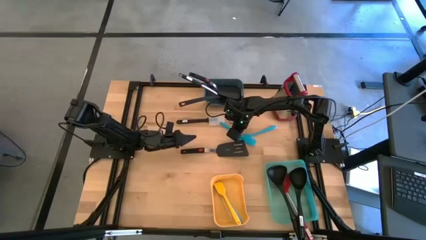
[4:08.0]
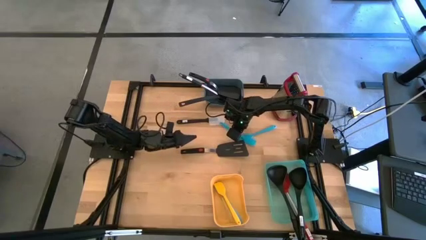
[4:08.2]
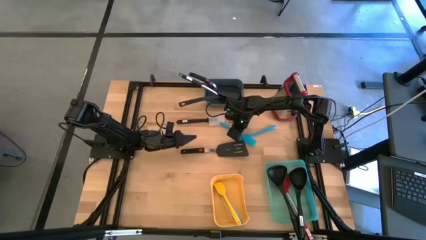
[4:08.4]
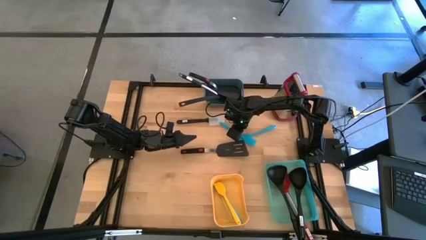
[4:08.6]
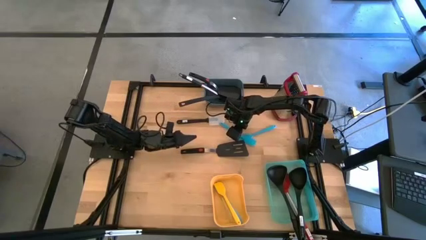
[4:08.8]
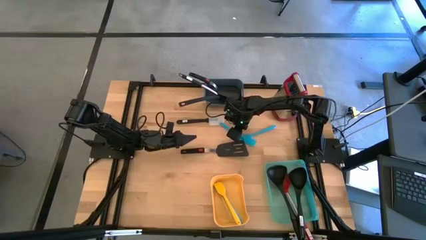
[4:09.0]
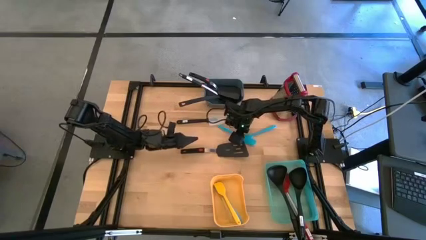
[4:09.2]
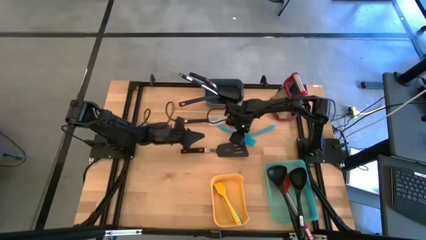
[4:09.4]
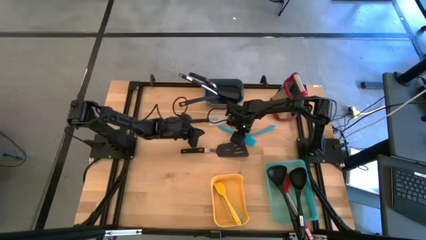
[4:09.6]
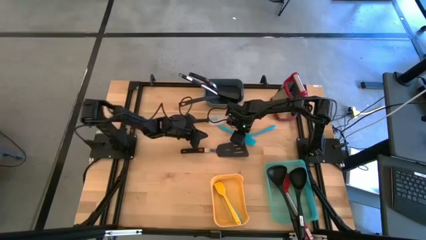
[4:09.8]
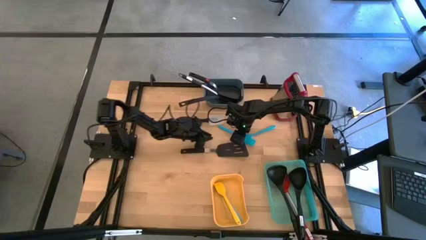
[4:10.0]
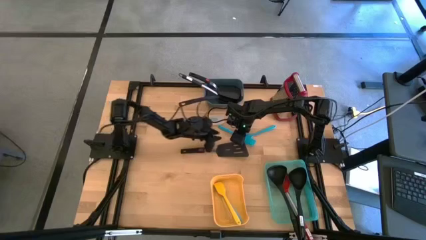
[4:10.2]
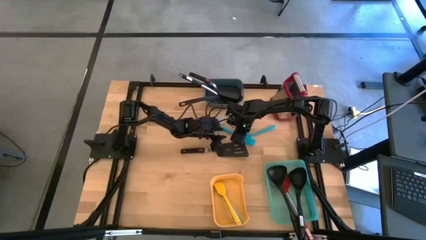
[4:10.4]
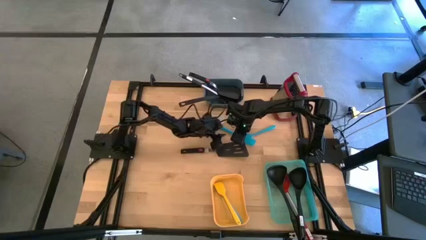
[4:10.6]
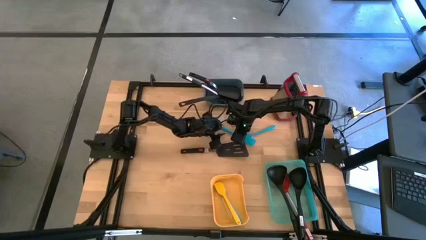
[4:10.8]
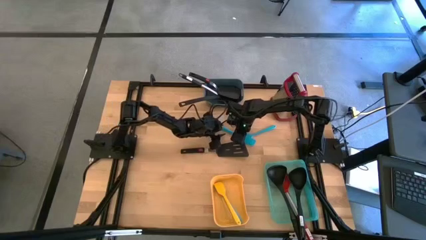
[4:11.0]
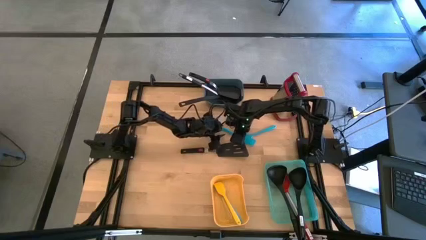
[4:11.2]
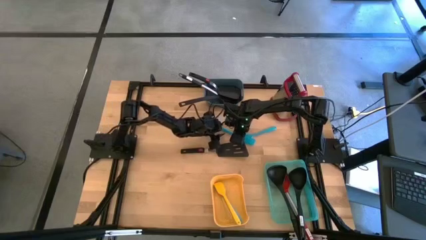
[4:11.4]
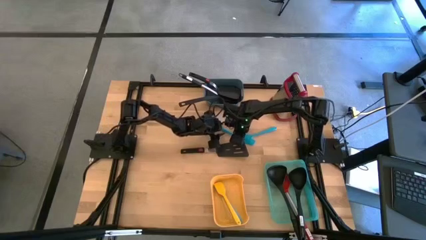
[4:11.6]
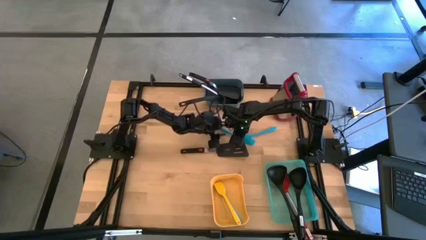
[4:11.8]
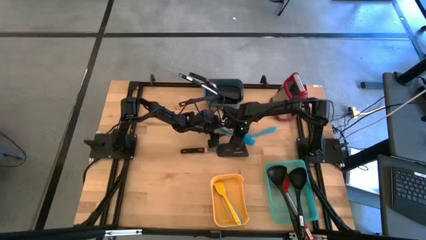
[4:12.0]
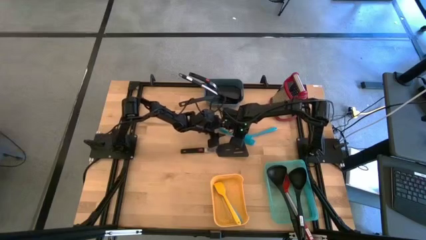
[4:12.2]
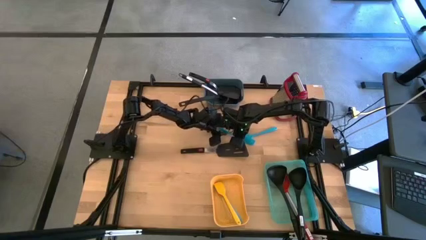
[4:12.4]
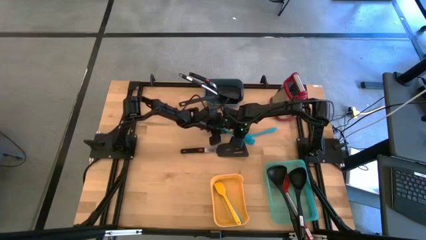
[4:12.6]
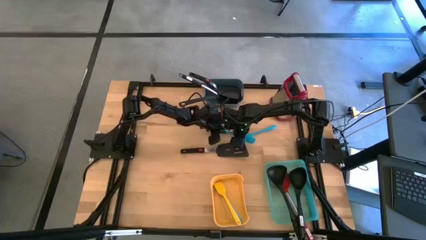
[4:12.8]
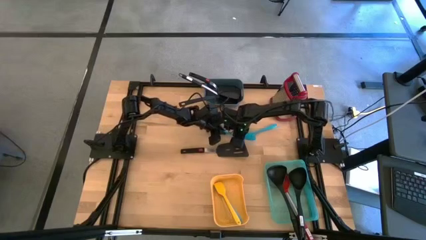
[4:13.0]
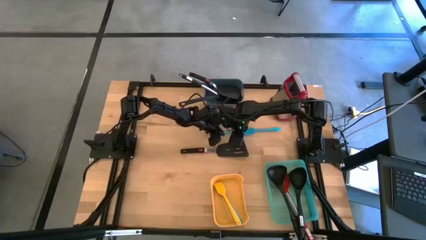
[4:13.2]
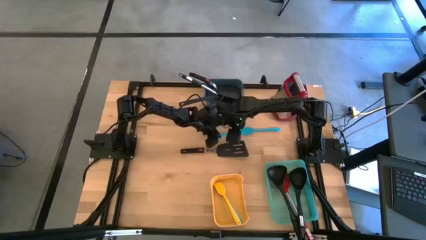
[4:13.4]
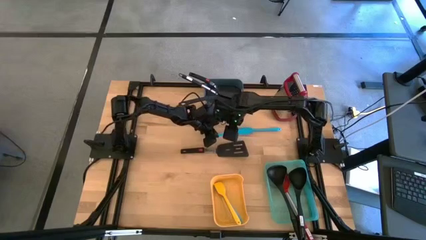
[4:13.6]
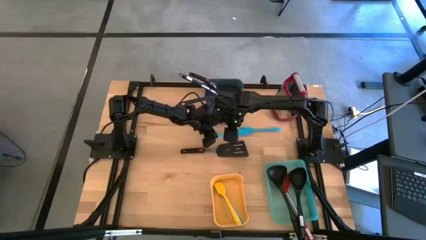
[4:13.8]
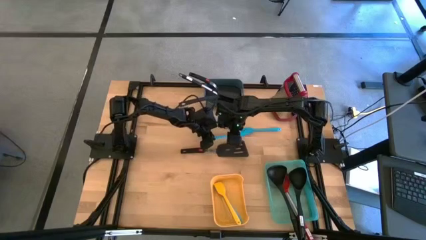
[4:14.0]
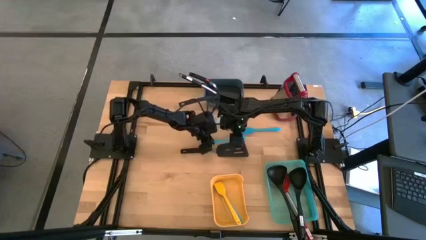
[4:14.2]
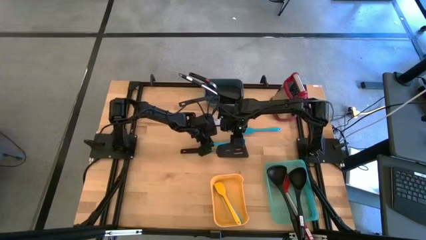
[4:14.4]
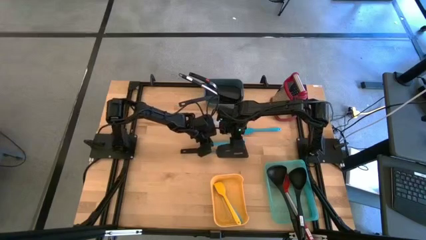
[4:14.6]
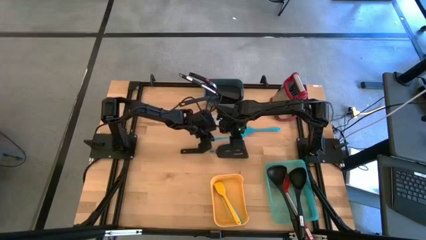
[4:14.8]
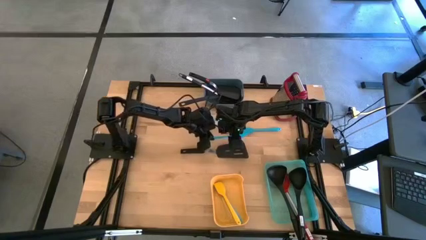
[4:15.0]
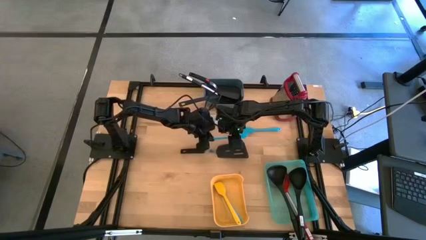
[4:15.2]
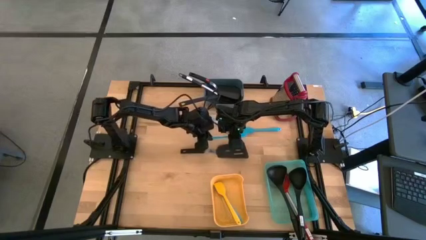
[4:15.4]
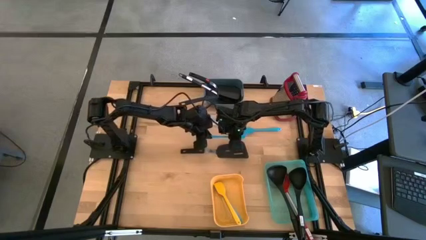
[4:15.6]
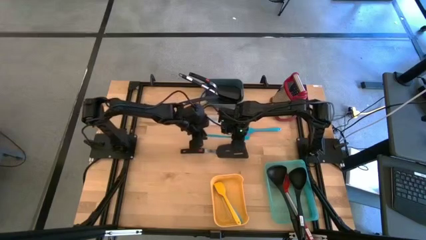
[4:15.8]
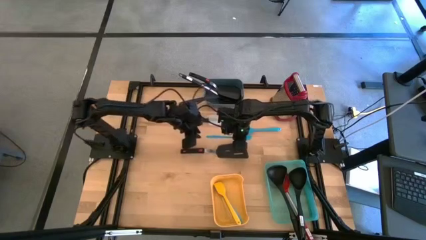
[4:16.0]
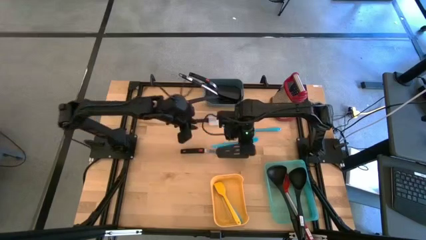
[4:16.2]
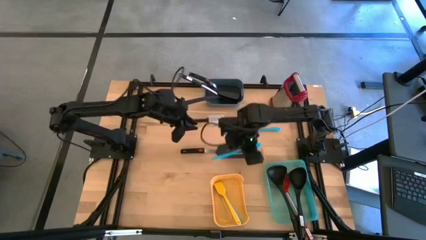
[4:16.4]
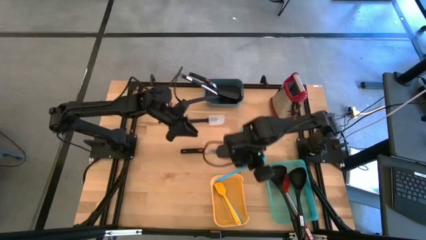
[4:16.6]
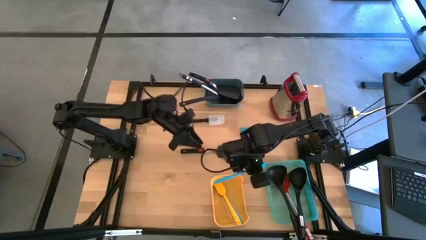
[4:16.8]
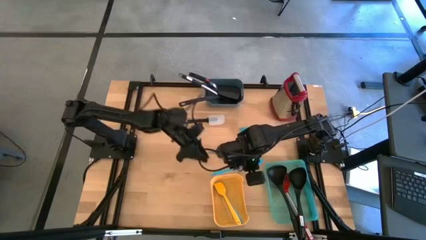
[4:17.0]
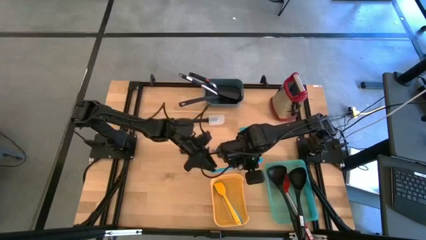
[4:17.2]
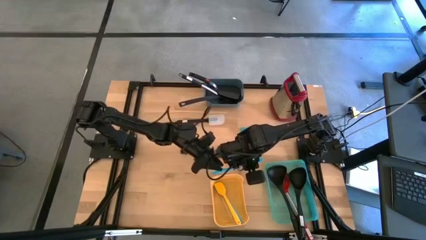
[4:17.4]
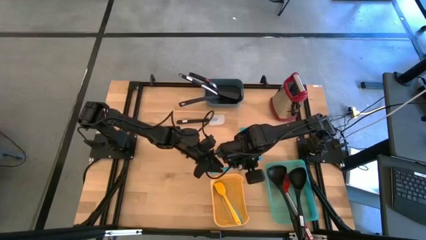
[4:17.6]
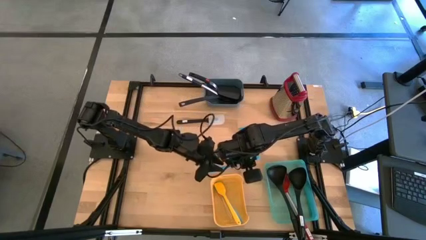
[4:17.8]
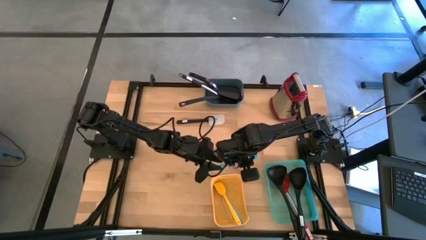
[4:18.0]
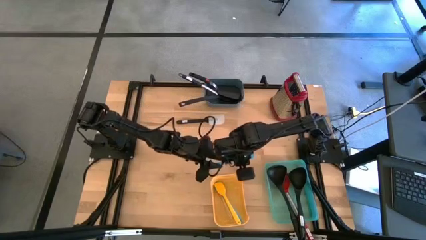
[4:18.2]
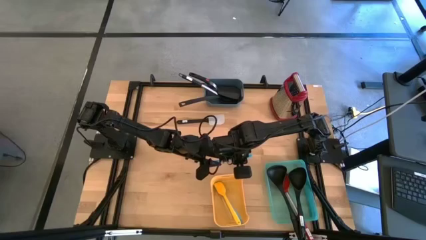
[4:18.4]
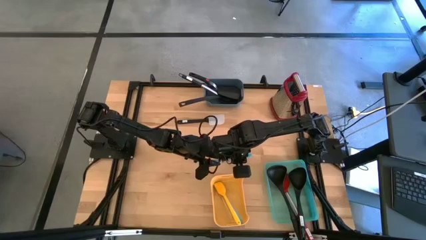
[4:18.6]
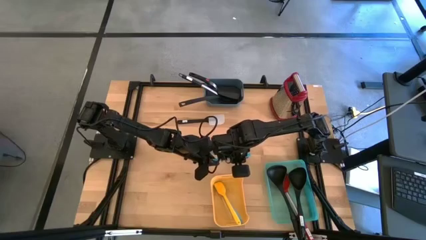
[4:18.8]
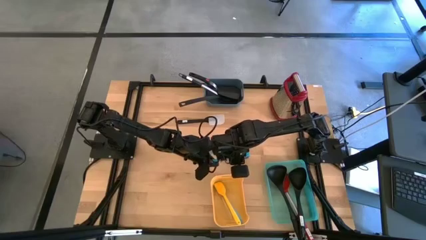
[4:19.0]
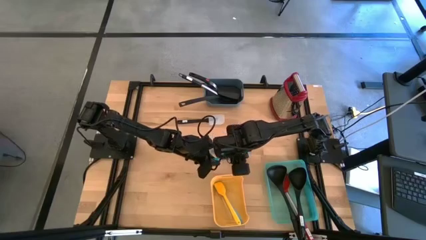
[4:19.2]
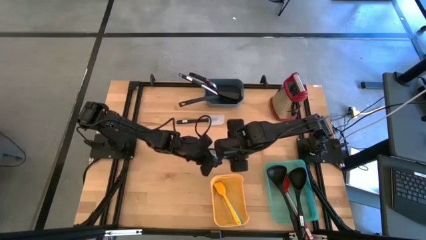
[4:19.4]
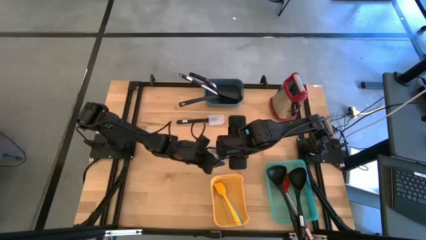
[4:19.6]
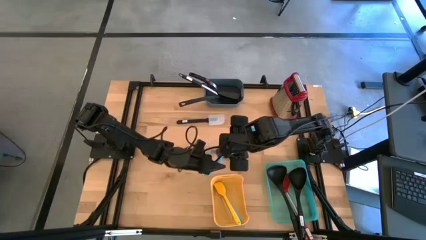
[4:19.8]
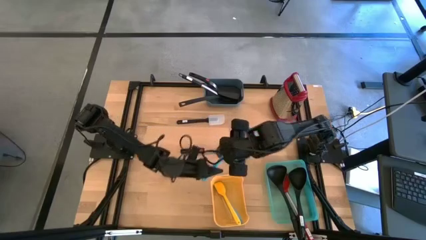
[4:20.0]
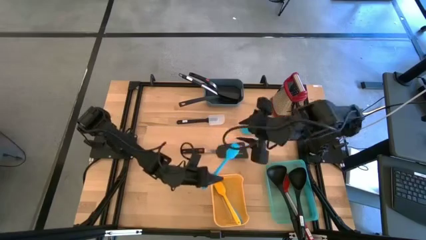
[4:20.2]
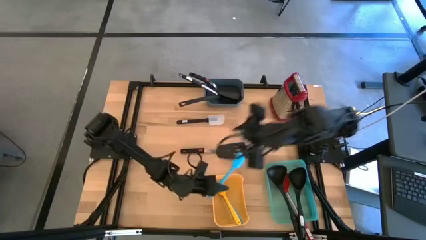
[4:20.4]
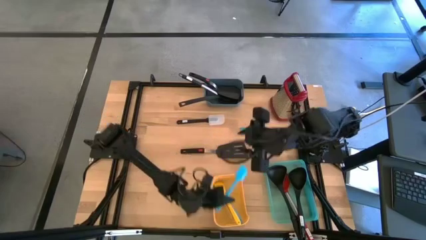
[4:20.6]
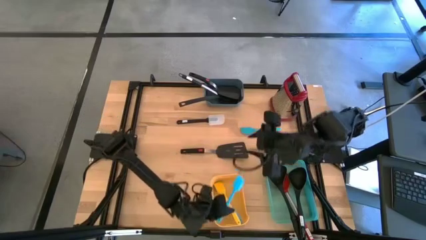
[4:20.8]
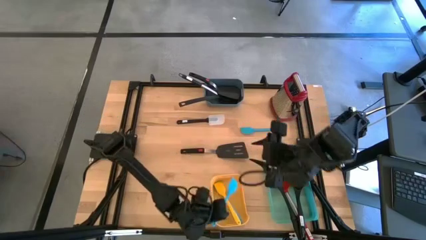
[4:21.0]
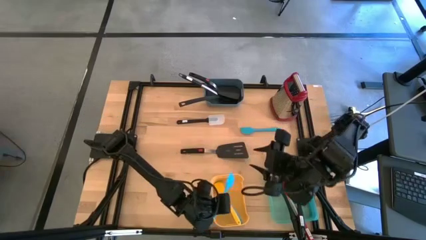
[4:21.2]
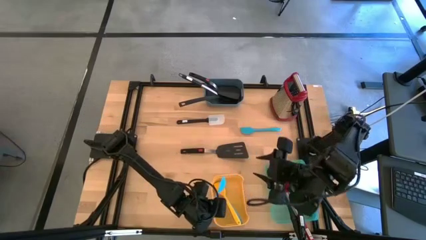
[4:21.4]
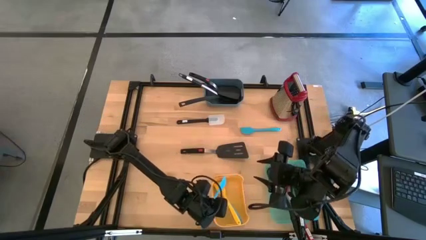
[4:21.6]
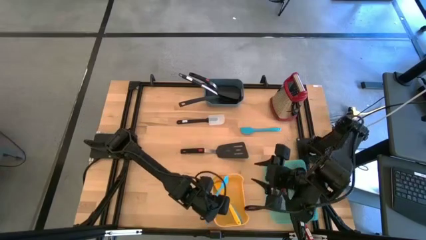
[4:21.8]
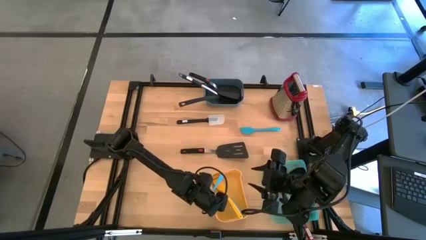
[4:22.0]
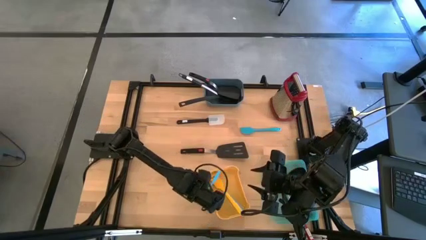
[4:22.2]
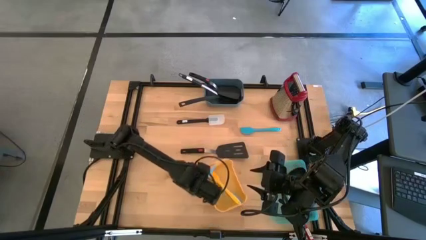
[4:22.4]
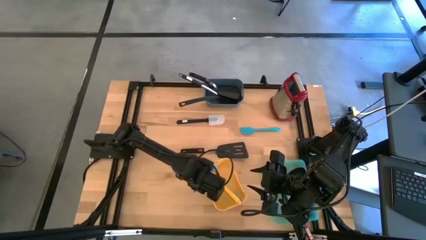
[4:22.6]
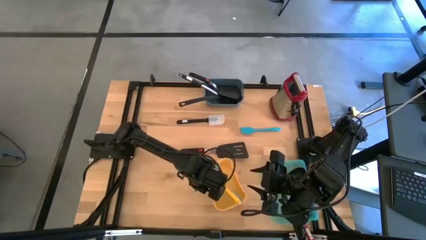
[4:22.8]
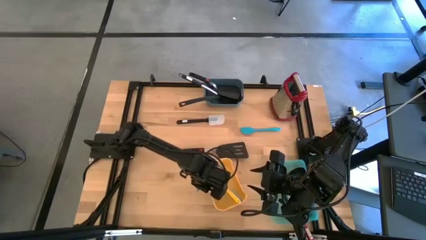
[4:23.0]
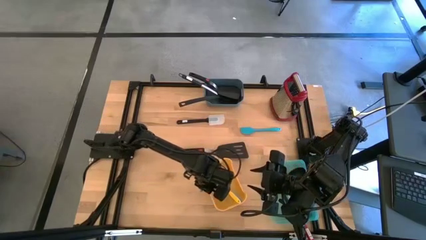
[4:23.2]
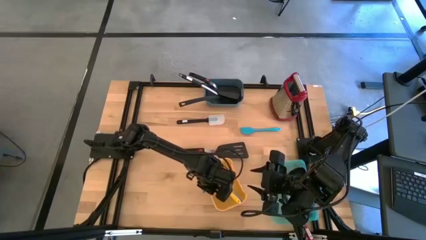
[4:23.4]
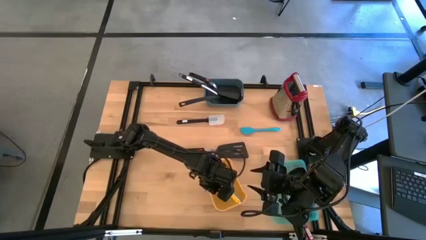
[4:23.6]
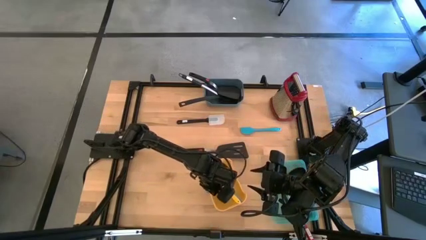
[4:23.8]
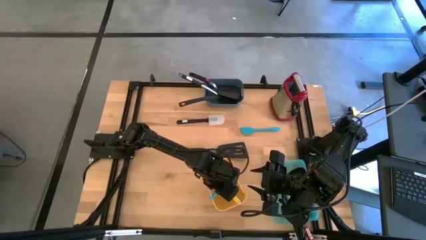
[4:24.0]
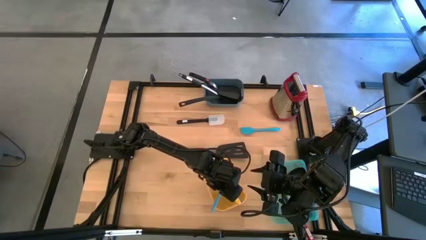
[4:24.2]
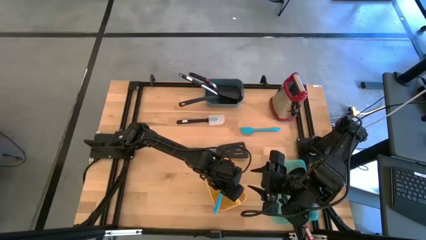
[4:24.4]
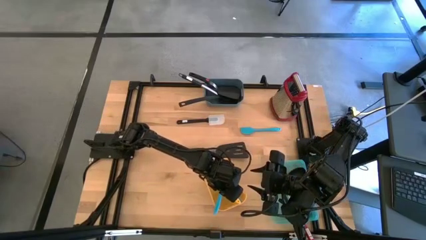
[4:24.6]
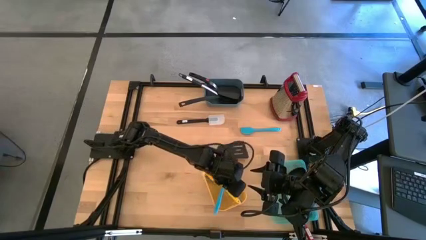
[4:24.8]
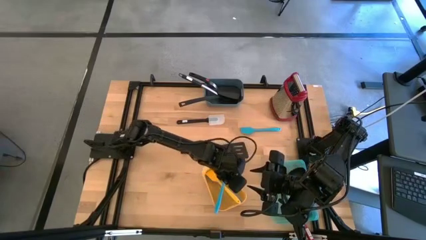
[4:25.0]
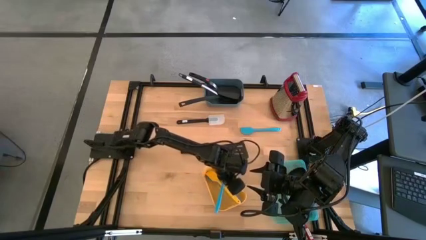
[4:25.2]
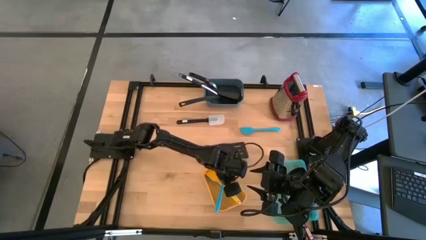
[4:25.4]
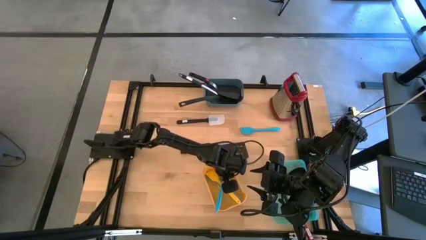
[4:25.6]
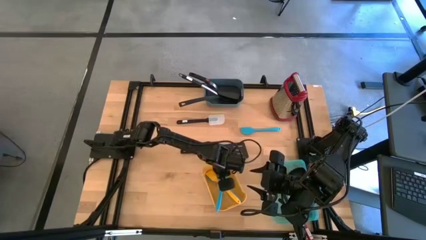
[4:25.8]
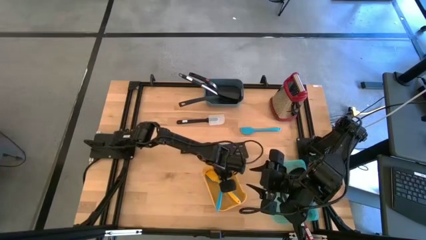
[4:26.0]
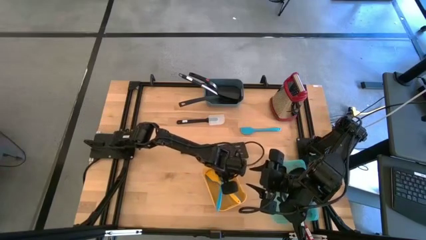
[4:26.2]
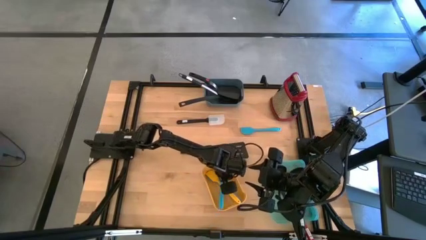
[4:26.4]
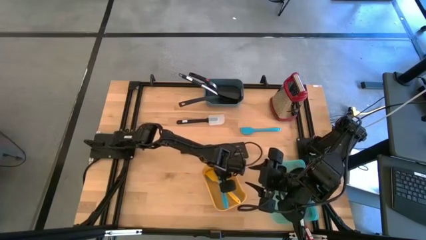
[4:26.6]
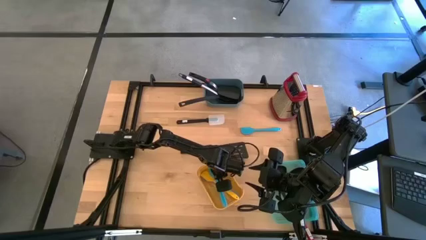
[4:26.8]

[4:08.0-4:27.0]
Task: Pick & Place Kitchen Items
Put the small blue spatula into the yellow bin
